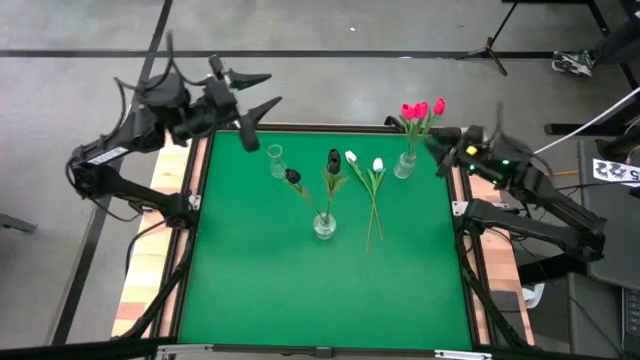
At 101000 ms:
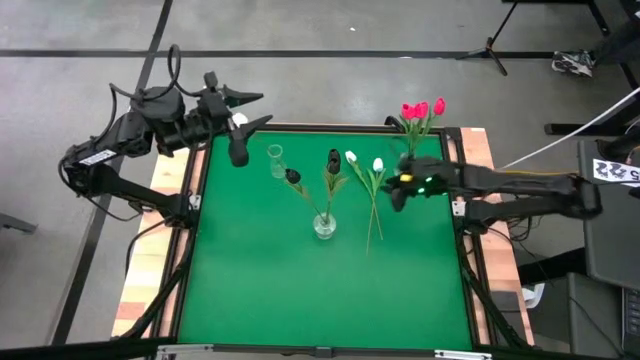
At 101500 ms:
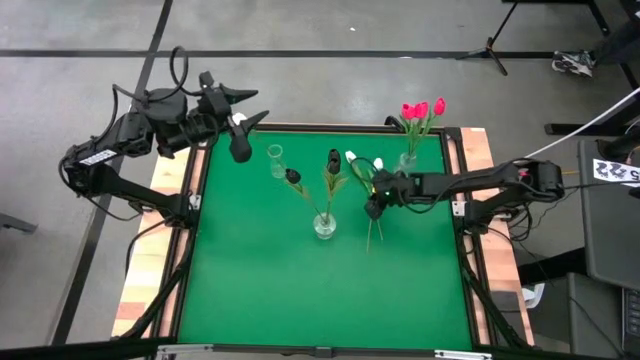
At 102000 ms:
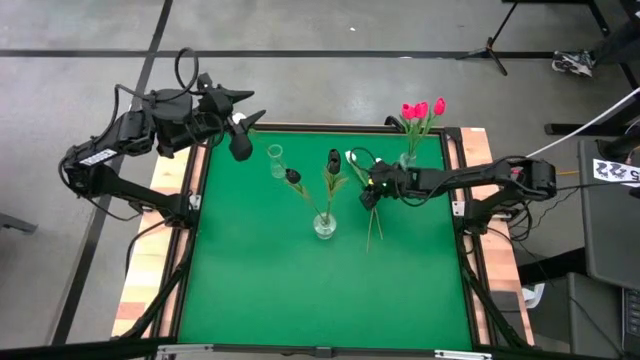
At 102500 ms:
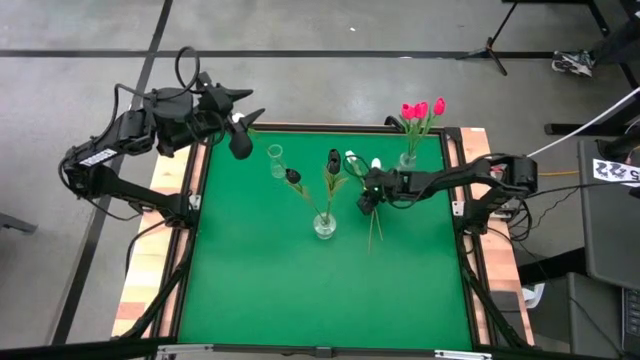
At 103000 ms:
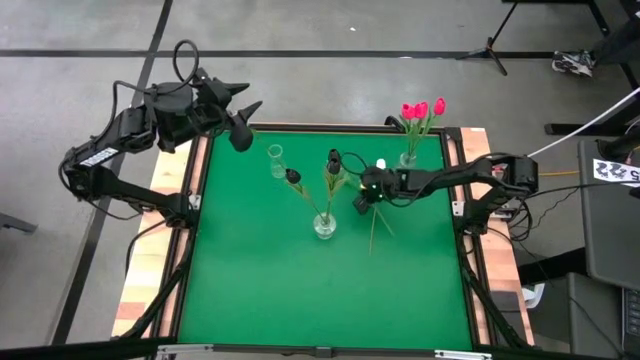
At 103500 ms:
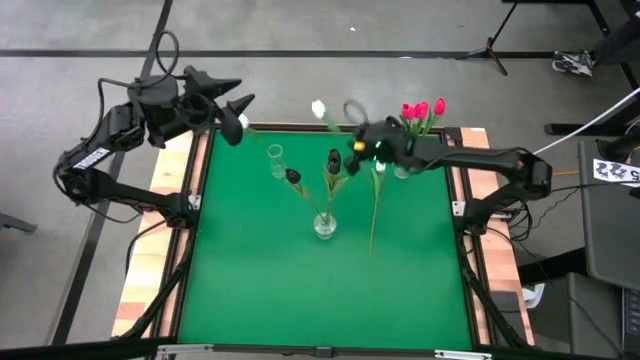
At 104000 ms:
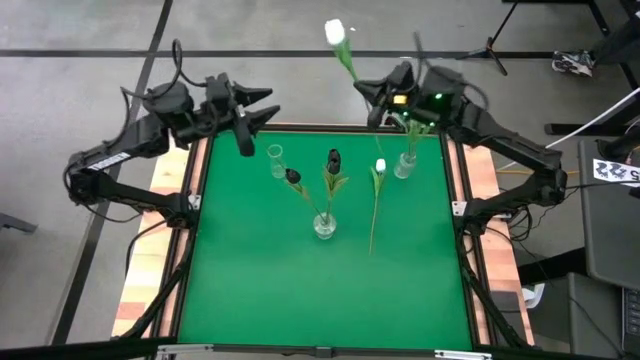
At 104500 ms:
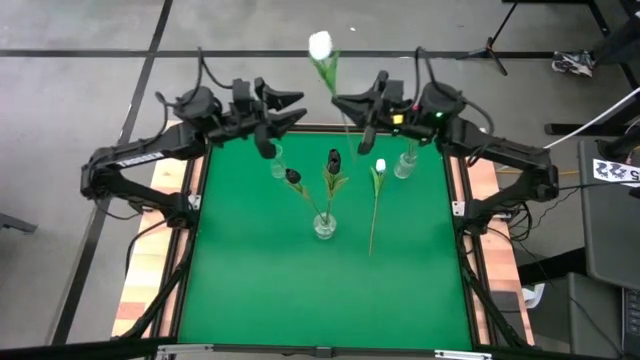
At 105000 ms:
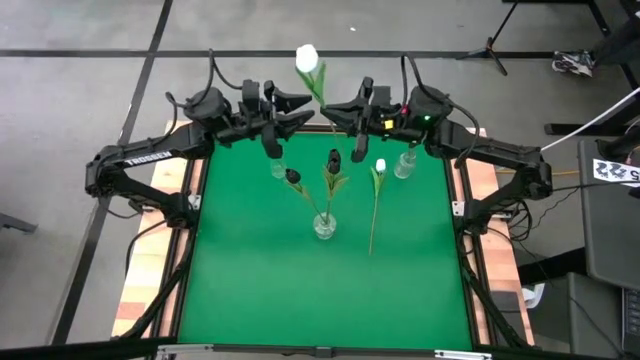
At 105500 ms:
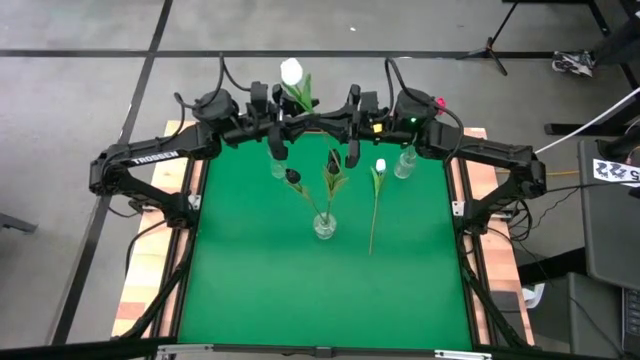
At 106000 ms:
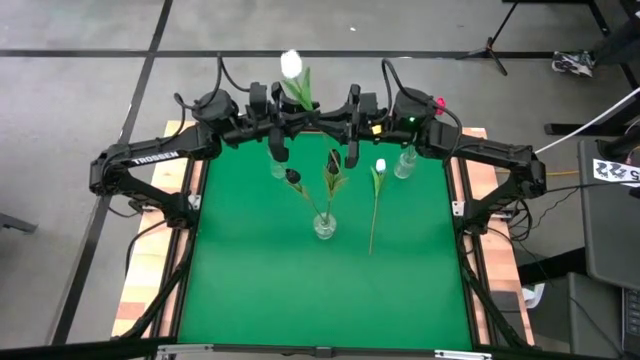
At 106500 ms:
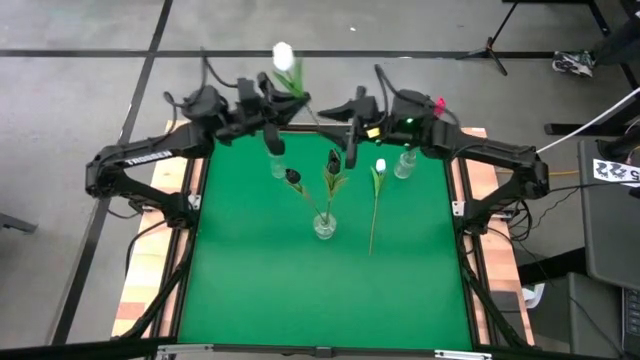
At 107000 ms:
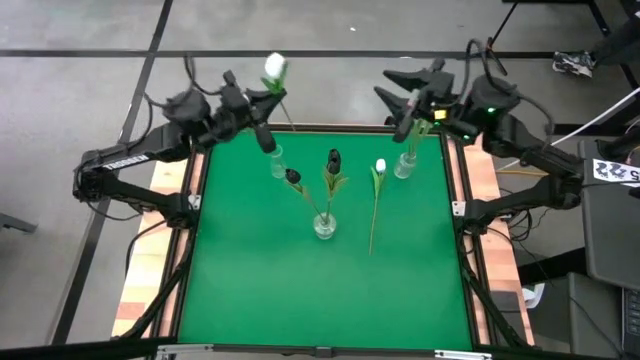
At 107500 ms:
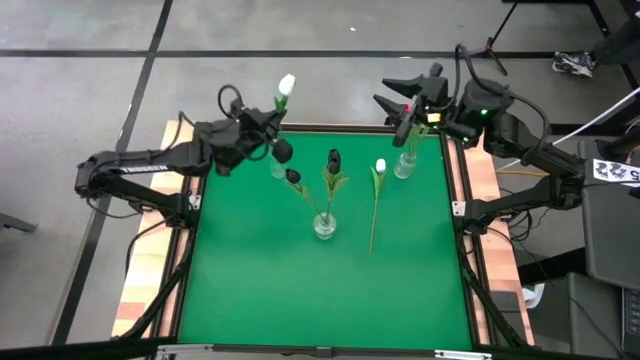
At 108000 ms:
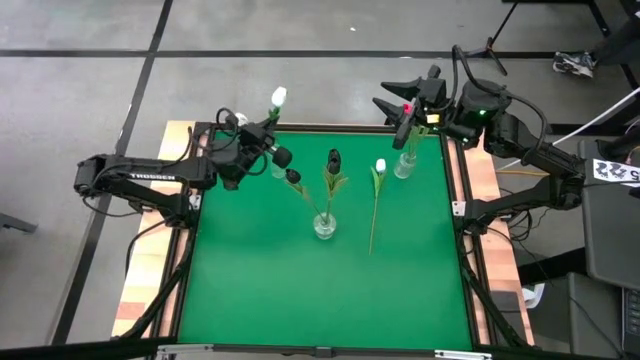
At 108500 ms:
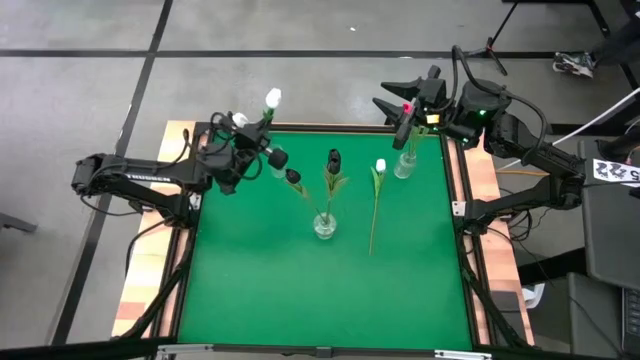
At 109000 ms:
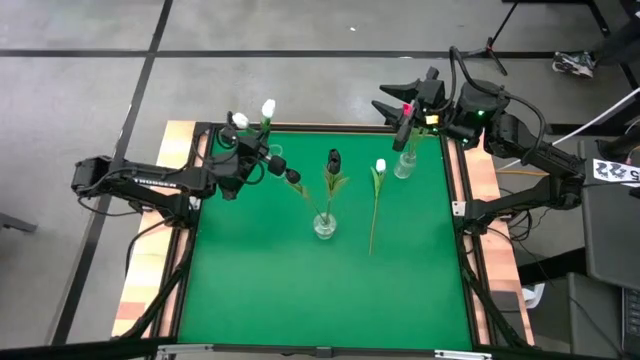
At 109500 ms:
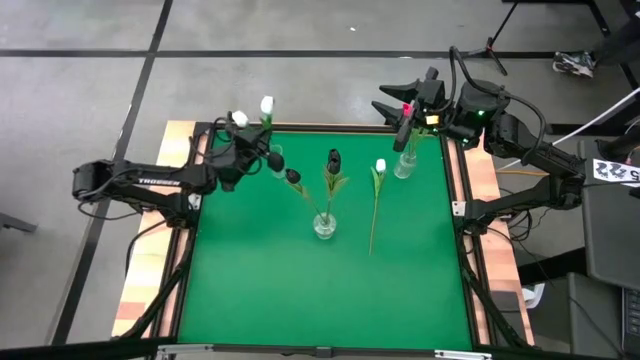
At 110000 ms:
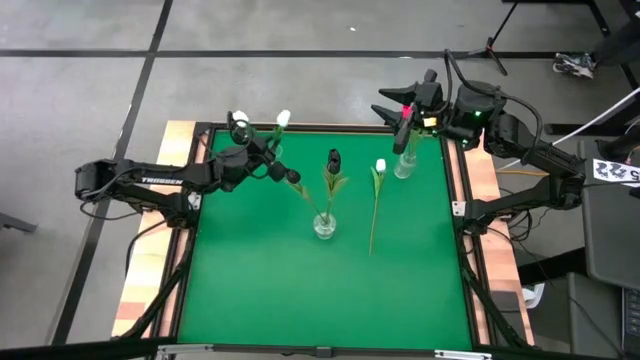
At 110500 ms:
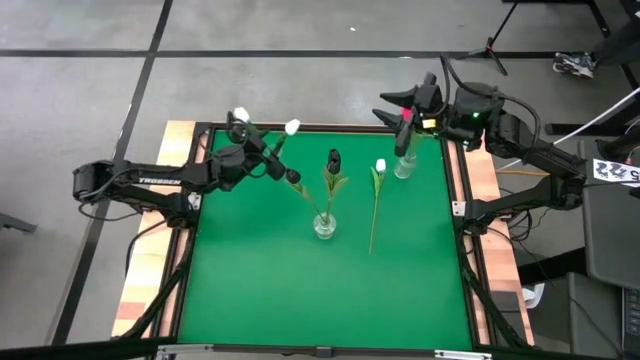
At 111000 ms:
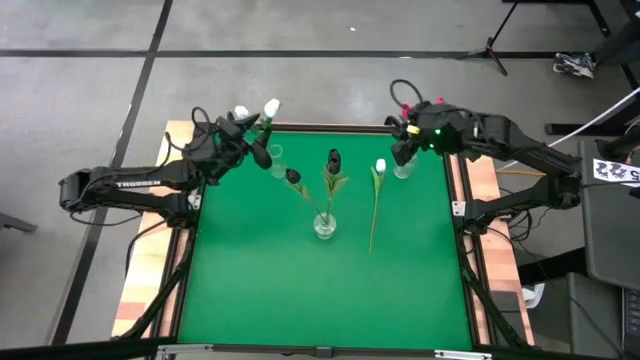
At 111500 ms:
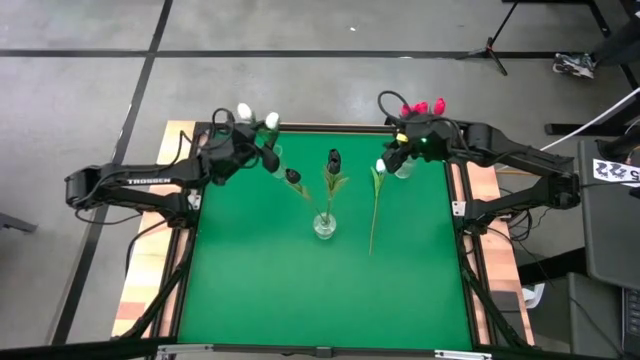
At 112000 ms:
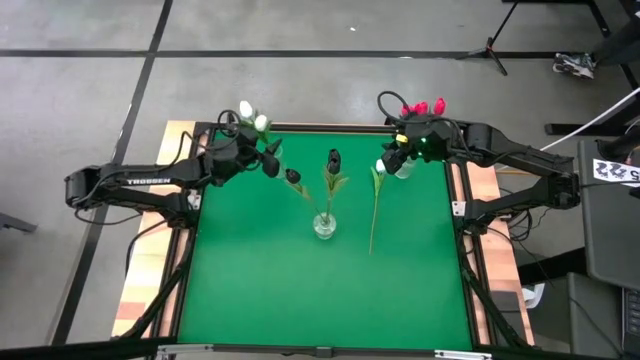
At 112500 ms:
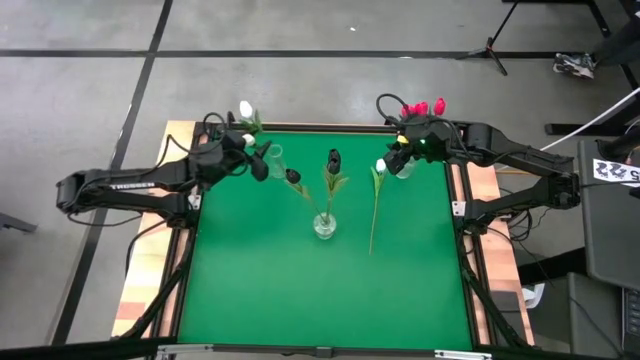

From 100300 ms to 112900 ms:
Task: Sort flowers into vase by color
Put the left white tulip into the top left transparent vase

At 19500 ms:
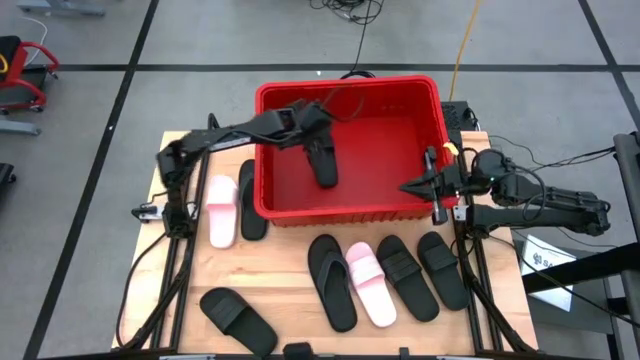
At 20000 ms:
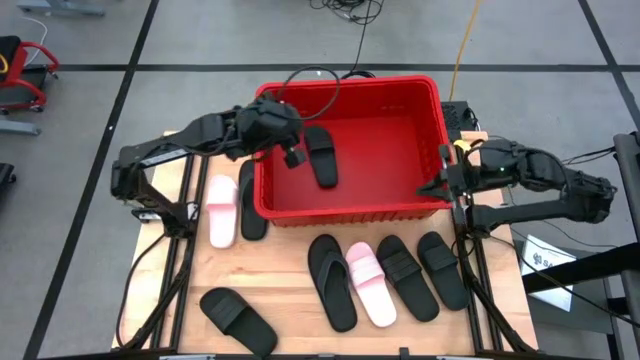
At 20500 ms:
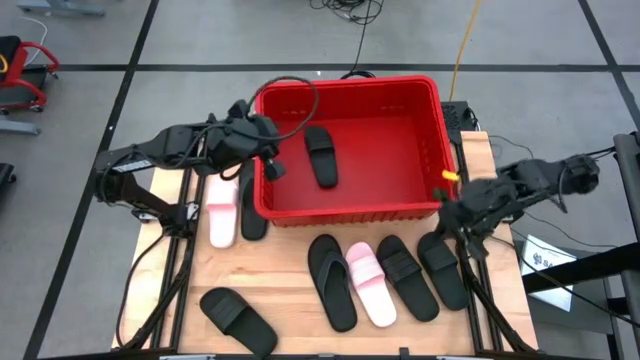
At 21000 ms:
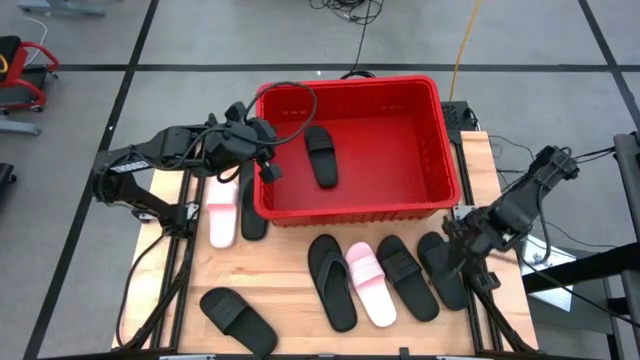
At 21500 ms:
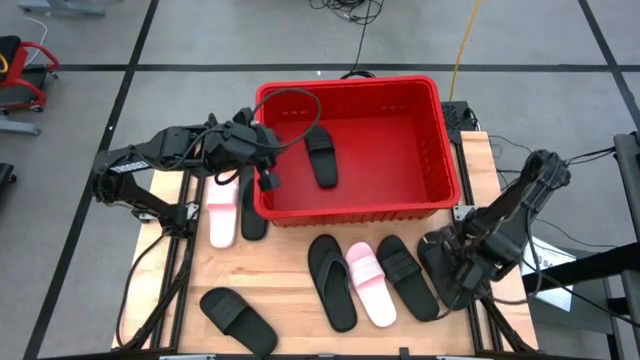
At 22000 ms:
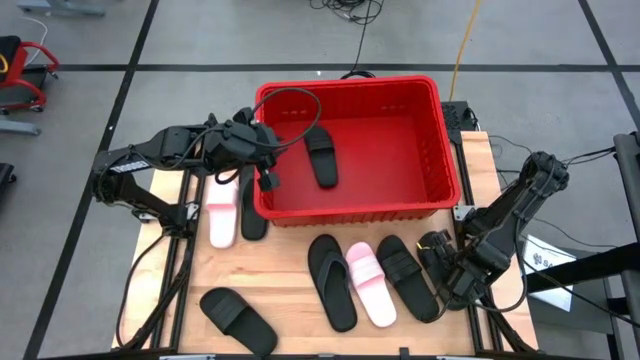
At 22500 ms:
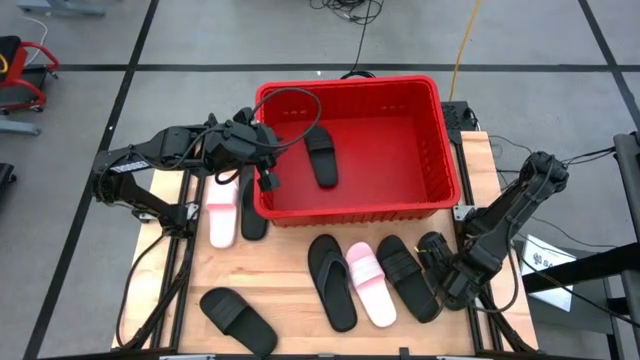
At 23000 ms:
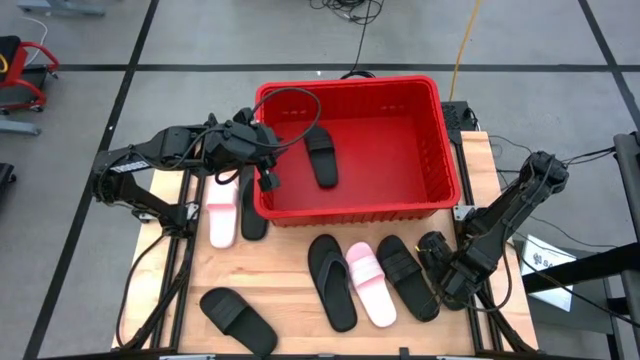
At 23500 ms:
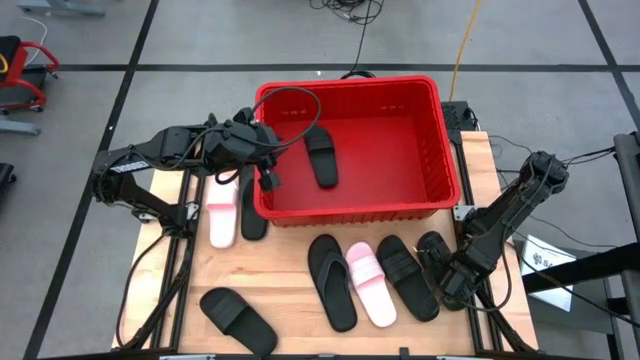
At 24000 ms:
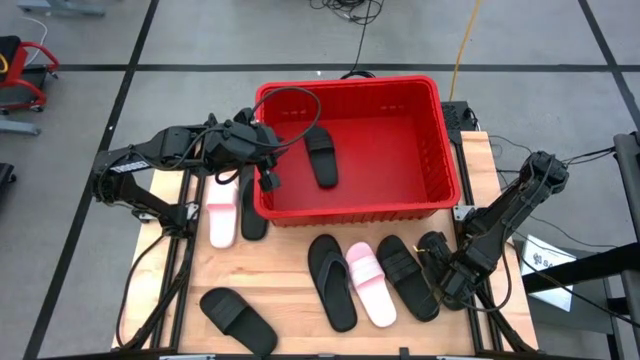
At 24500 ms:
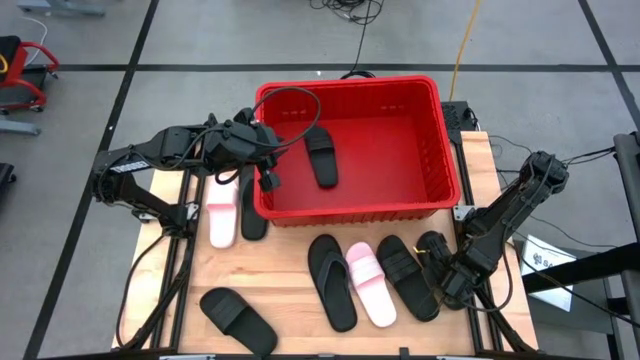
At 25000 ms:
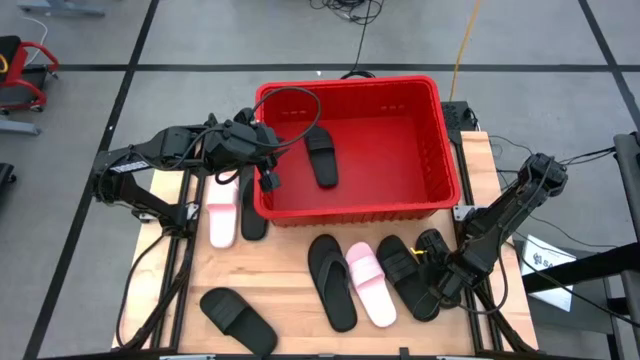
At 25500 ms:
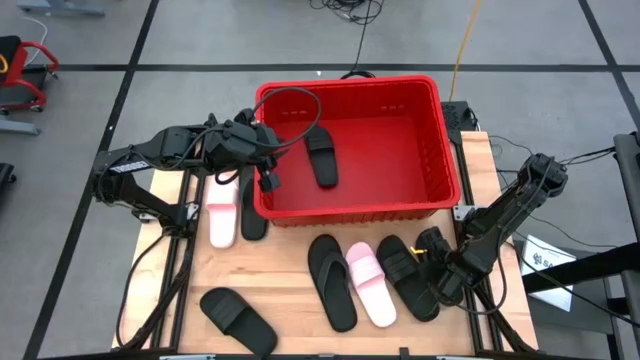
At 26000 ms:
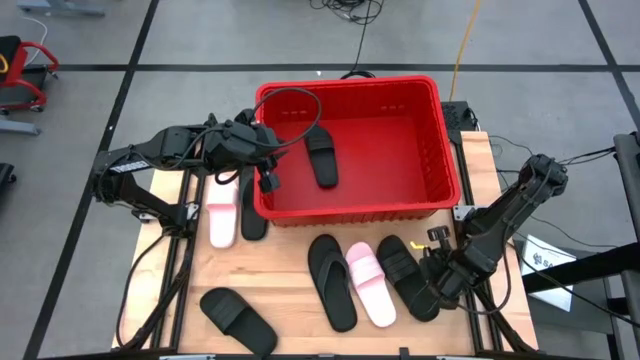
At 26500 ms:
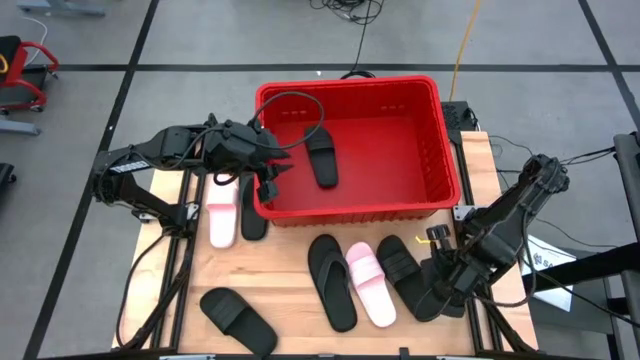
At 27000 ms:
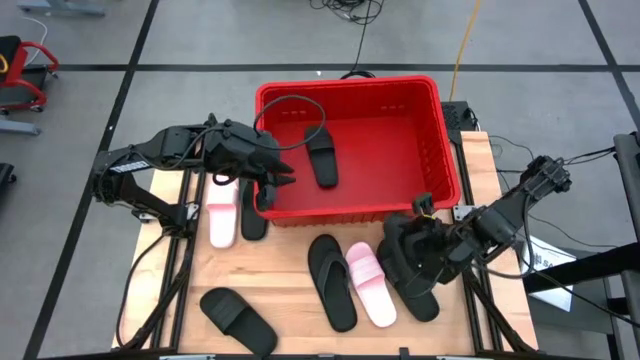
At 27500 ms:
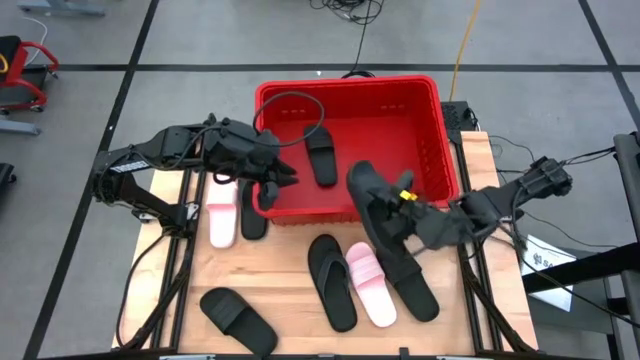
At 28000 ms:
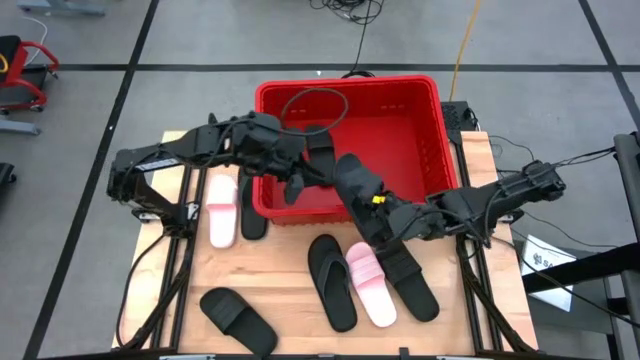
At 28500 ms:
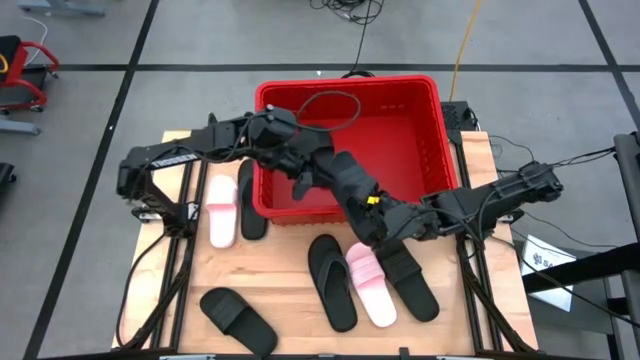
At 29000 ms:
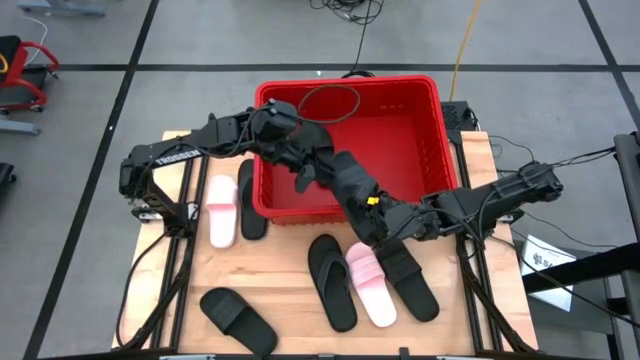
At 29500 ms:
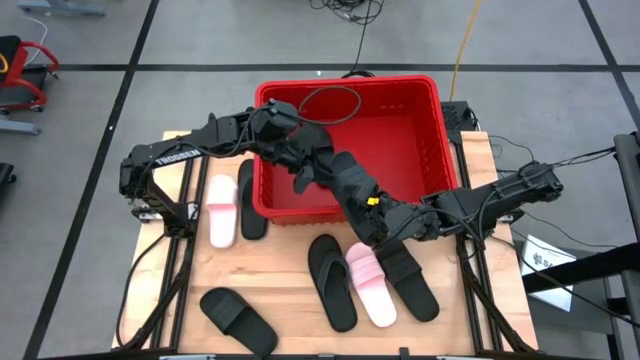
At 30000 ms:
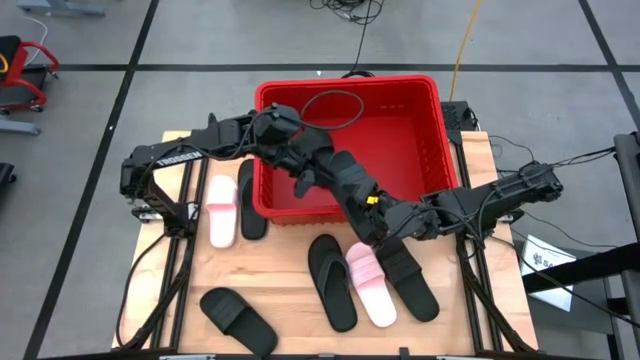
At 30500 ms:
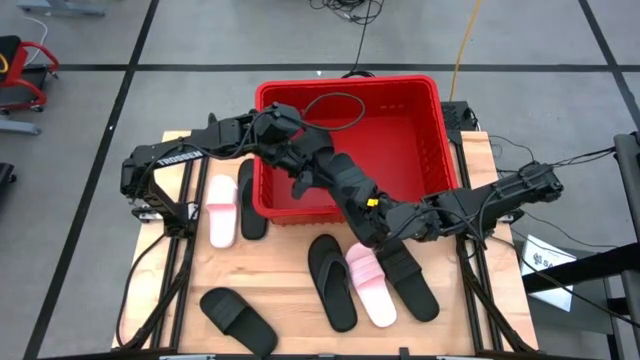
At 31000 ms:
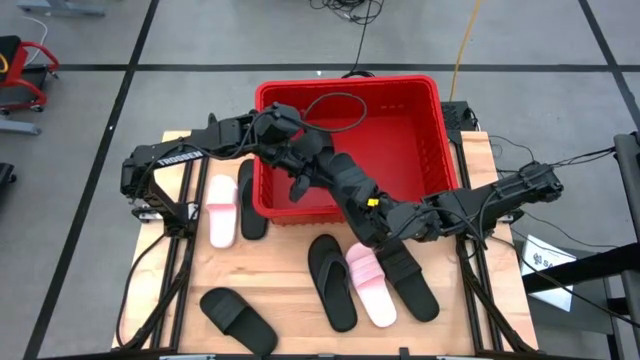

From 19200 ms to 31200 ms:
Task: Pick and place slides into bin
Put the right black slide into the red bin
